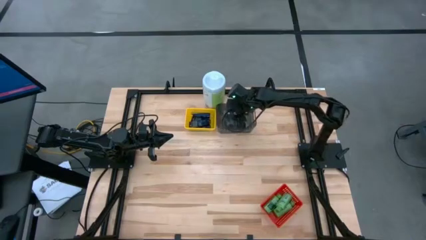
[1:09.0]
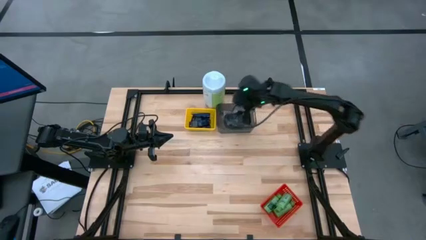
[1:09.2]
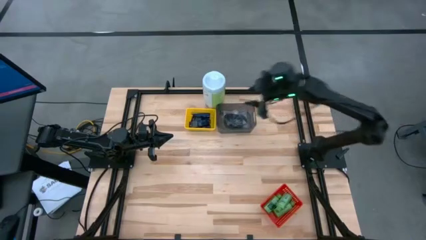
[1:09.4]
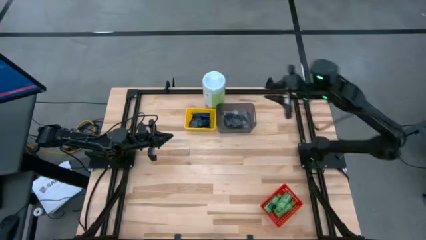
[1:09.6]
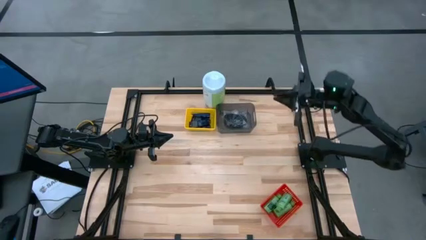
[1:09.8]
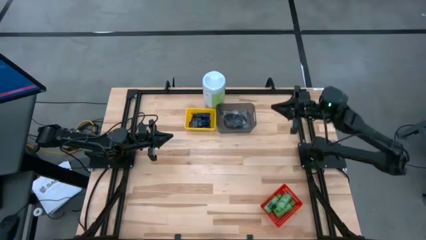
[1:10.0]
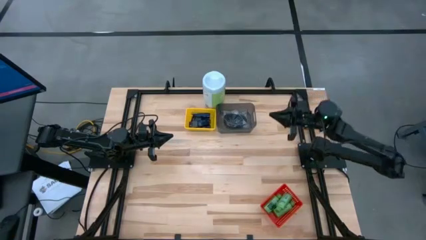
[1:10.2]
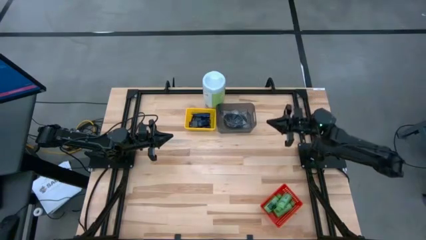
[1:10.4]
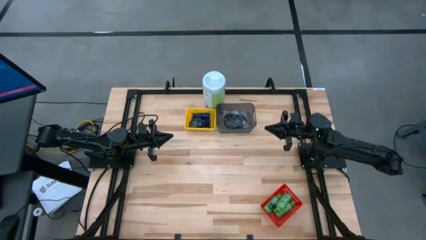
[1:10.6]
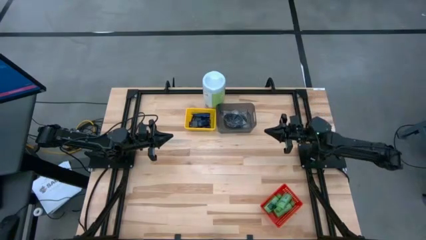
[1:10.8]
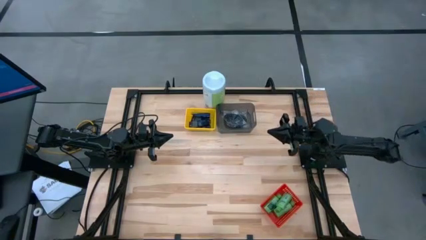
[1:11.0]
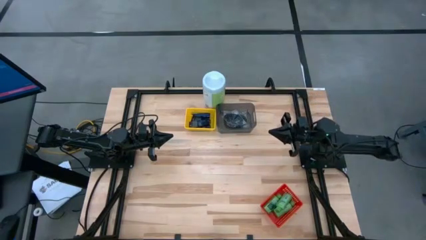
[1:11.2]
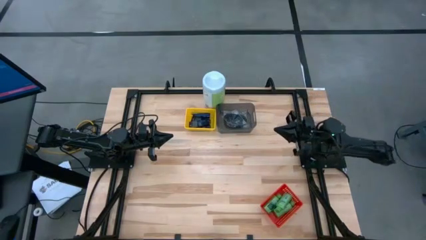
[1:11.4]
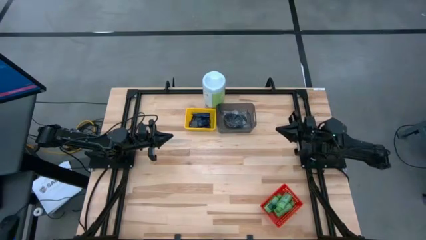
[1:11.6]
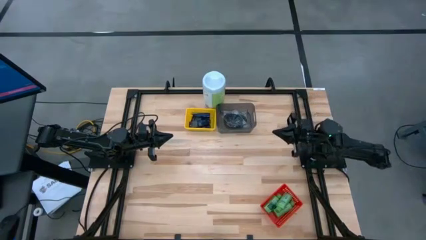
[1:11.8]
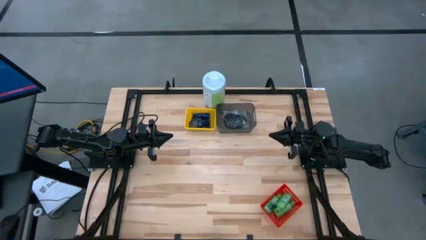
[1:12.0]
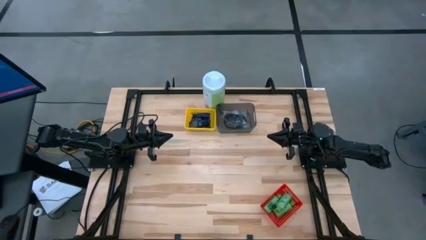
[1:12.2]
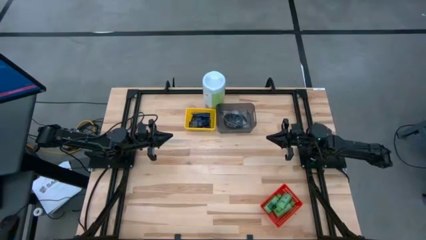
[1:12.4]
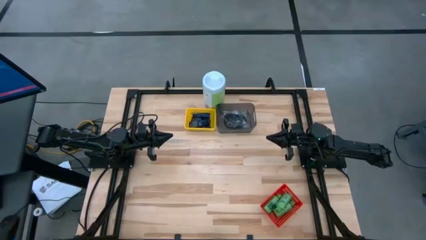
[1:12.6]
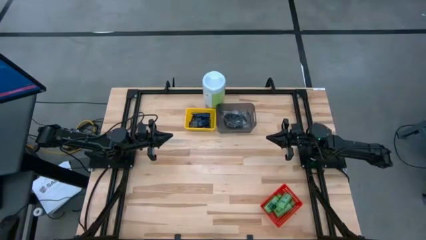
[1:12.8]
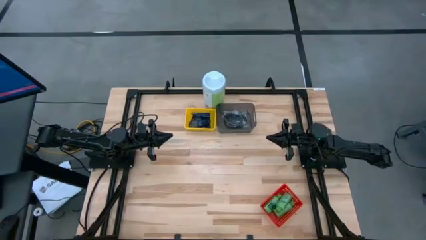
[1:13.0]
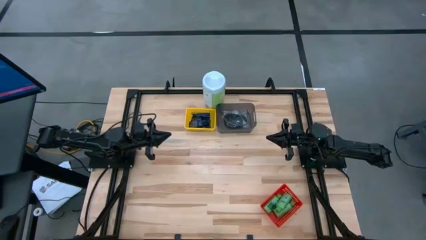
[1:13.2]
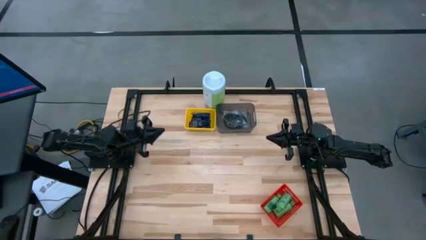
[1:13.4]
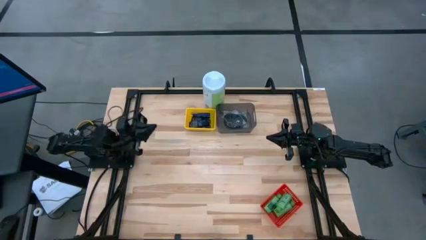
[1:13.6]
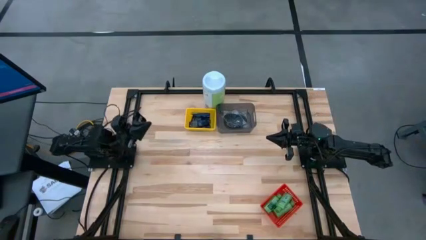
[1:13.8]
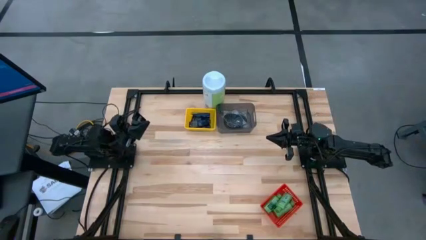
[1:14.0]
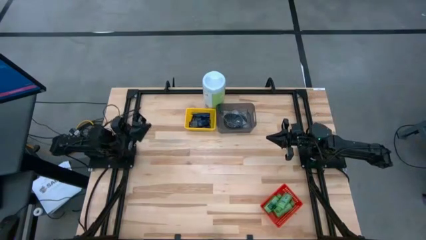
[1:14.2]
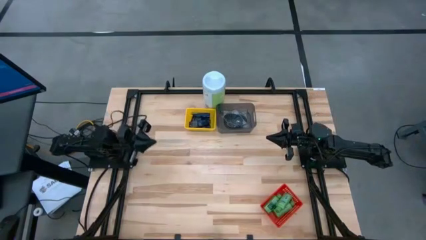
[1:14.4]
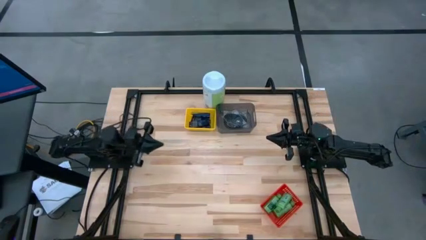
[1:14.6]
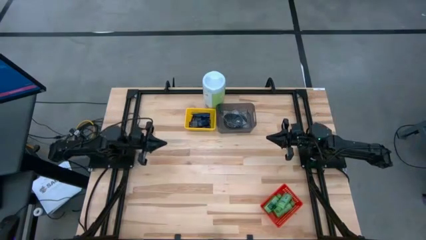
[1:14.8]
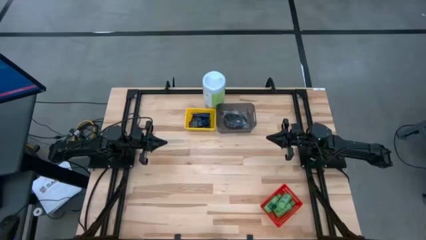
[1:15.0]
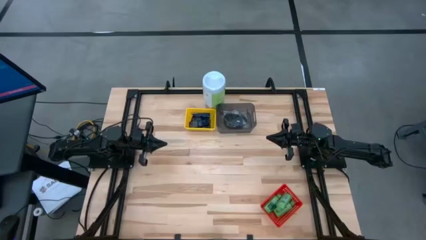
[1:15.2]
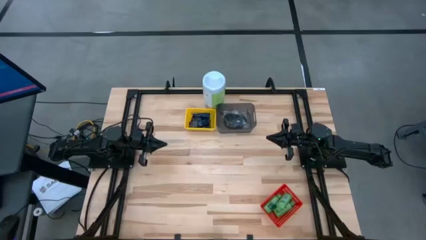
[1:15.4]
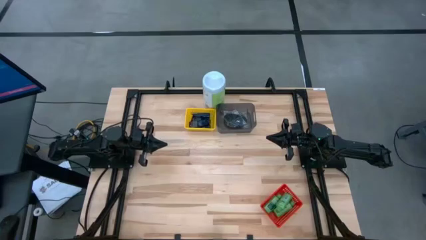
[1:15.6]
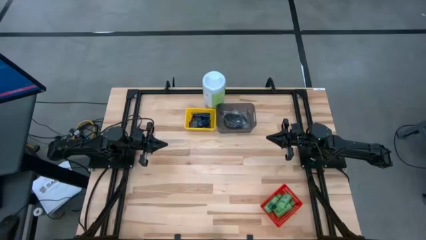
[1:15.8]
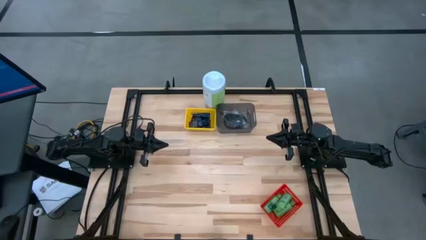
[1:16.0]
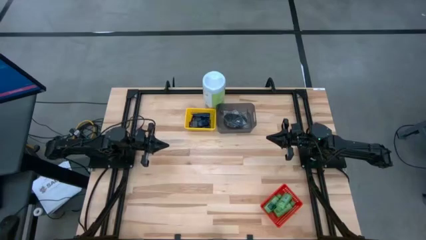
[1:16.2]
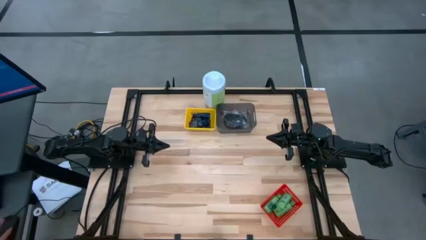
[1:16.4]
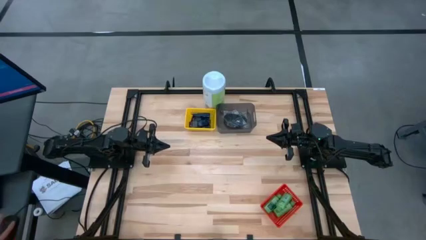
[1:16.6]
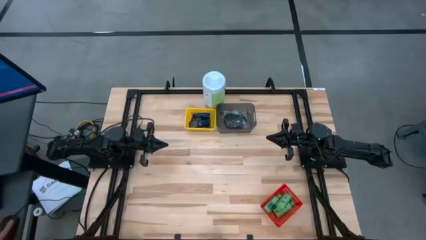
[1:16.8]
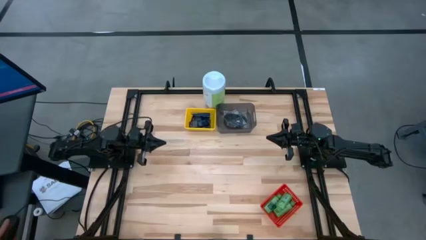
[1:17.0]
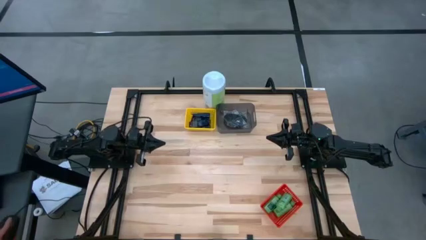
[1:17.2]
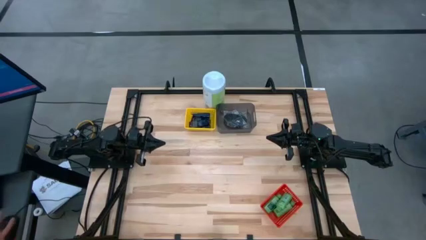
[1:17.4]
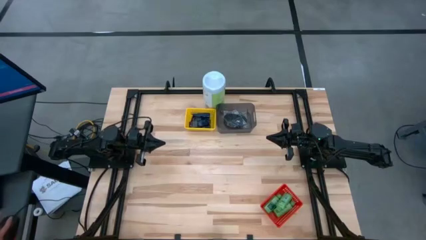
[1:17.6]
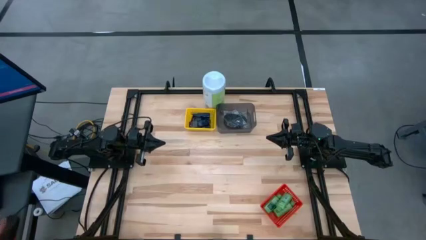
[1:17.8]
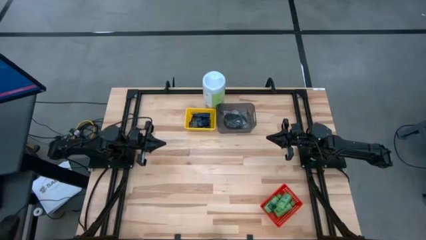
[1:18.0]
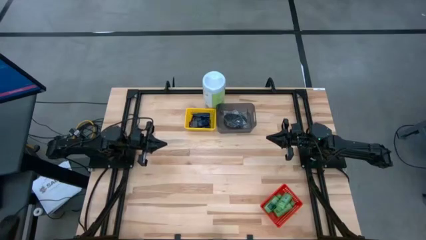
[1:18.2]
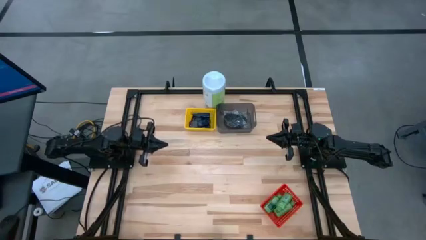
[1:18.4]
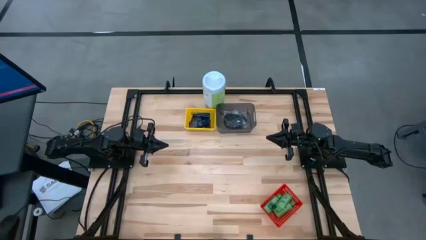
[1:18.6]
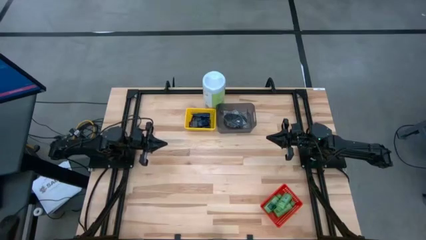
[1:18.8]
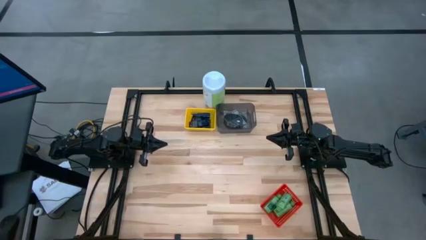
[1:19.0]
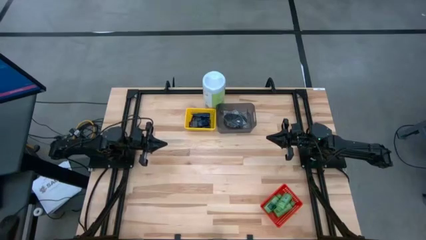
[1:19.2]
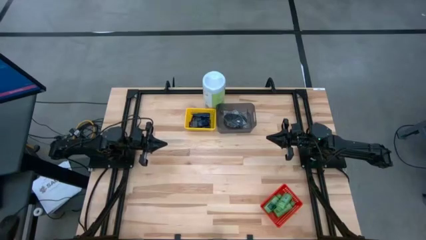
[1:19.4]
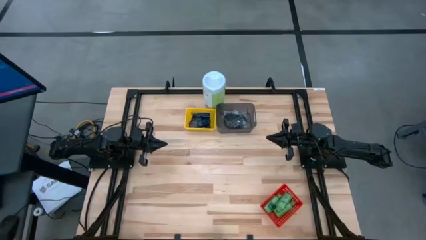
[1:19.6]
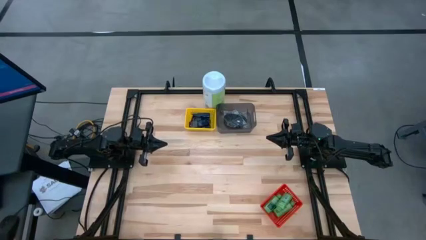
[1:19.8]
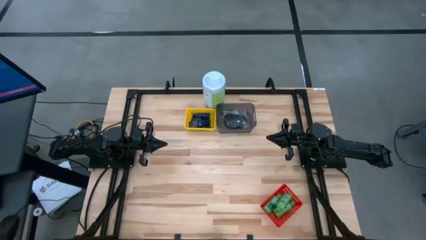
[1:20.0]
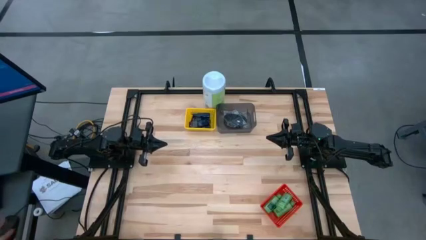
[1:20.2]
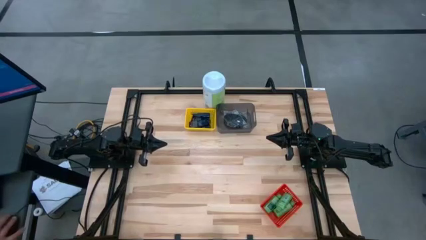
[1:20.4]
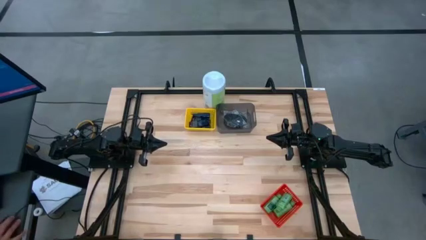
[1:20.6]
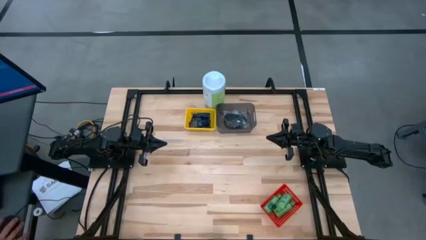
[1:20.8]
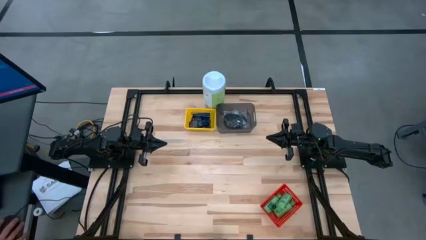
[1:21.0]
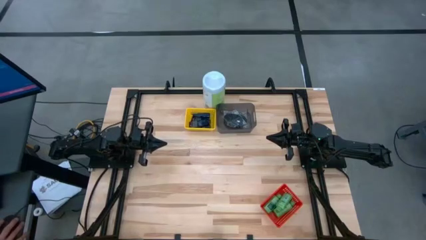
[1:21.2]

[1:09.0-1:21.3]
Task: Pick & Place Travel size toiletries
Return to Home Position

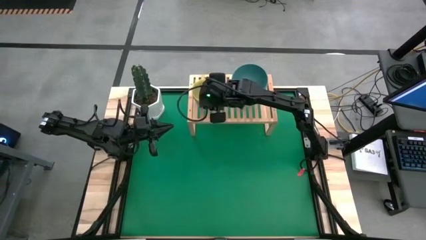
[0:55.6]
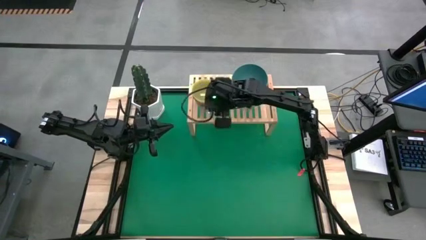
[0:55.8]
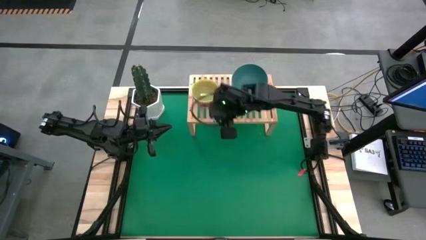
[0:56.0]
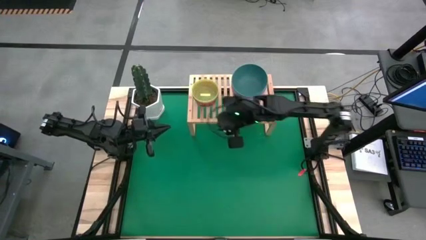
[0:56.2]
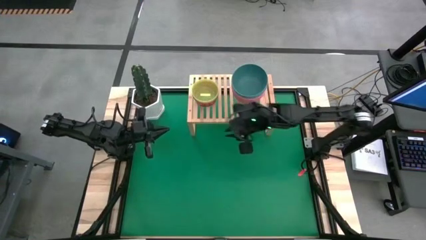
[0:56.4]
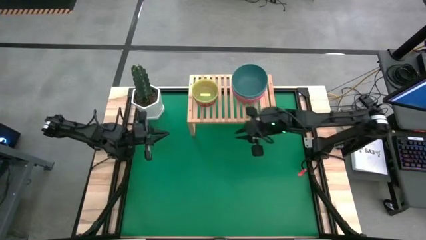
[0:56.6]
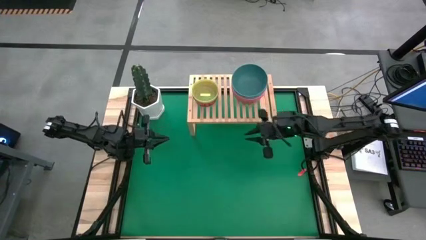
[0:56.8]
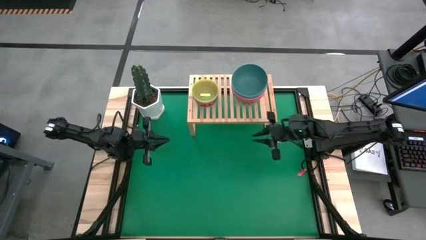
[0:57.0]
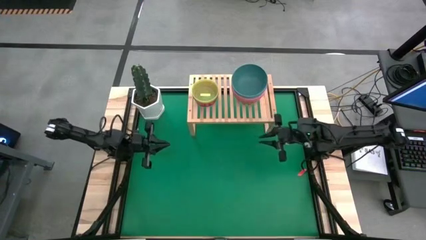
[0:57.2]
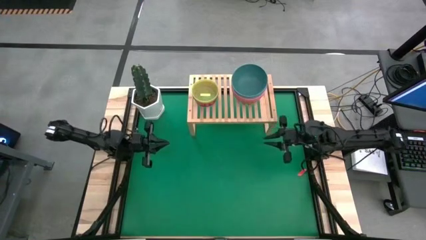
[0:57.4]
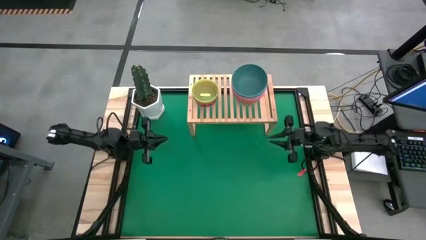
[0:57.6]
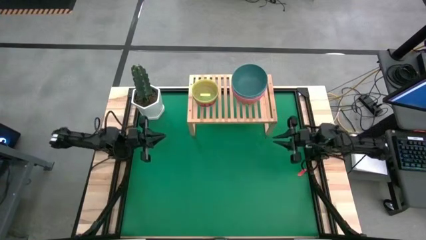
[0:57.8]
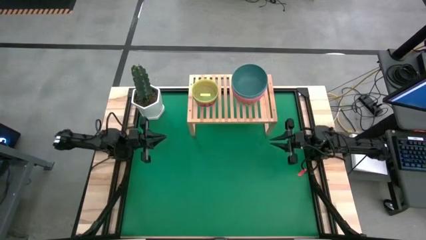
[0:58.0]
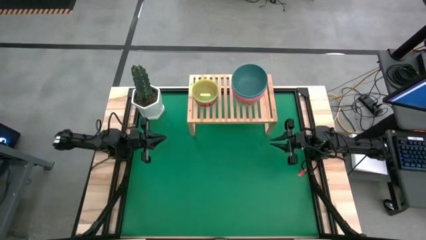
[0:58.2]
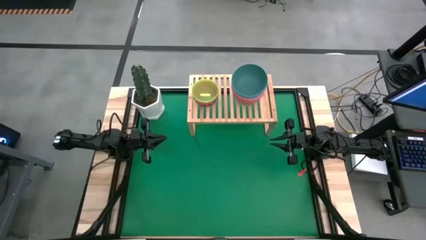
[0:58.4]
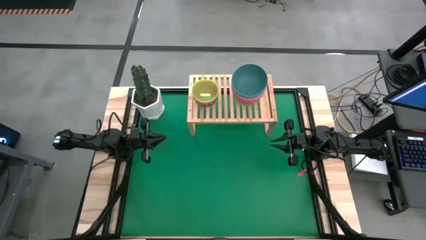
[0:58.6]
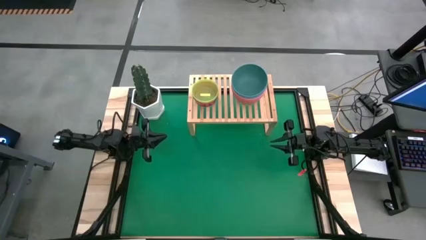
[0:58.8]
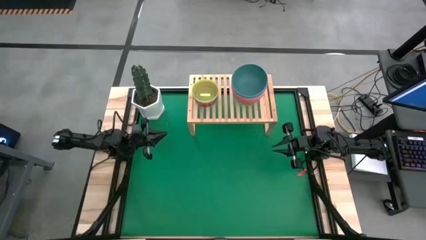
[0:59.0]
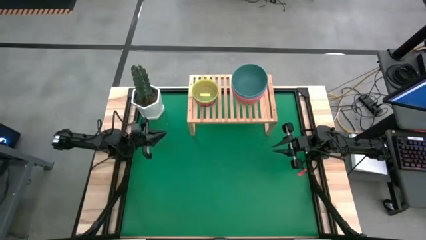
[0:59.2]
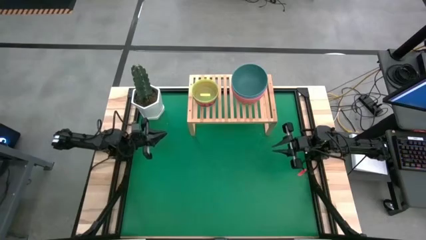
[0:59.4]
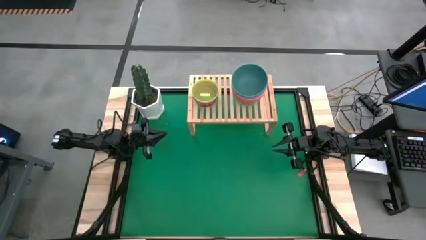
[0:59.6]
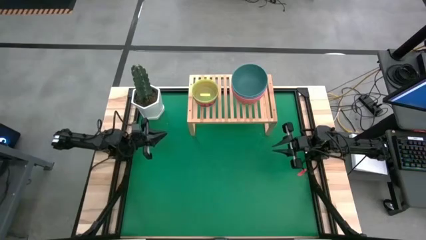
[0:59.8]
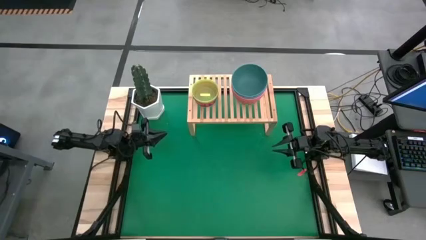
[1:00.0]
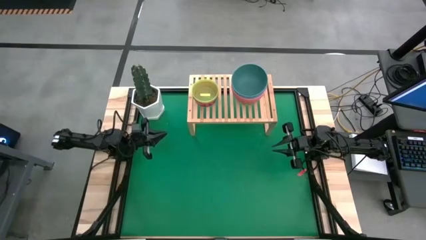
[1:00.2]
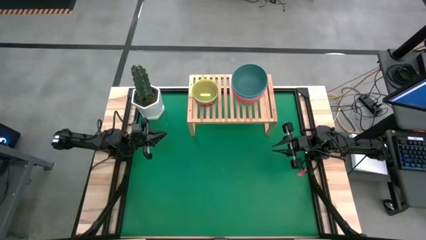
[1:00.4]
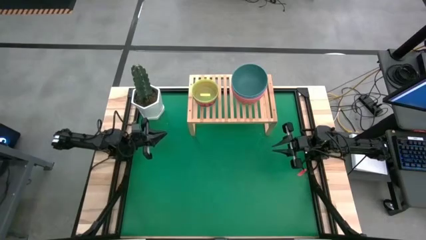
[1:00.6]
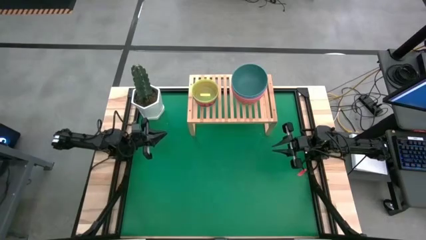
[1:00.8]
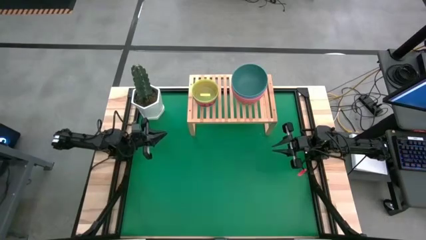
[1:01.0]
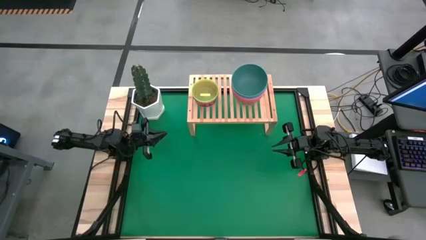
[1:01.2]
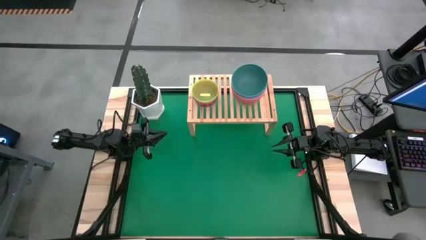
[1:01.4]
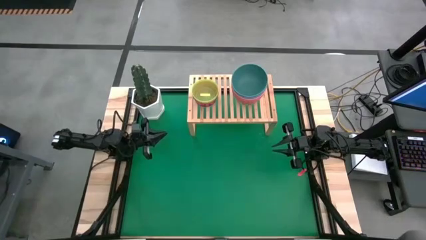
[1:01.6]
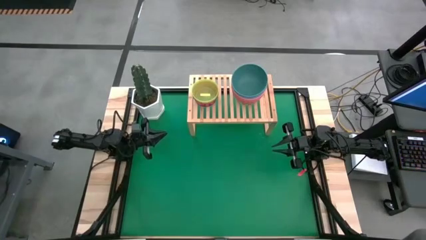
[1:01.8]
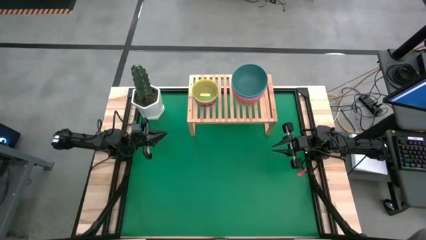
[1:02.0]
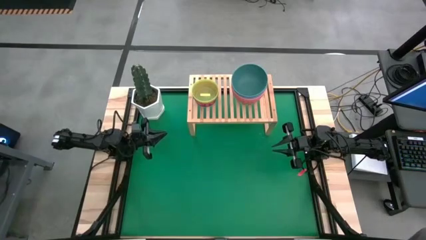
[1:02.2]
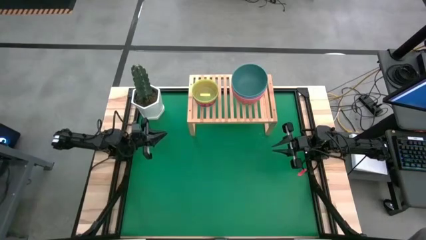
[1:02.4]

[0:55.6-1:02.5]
Task: Place and stack bowls onto a shelf
Return to Home Position
